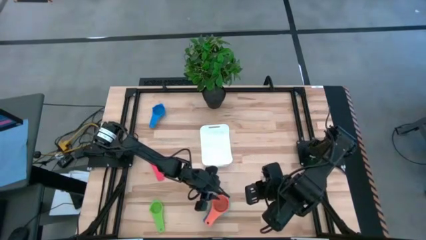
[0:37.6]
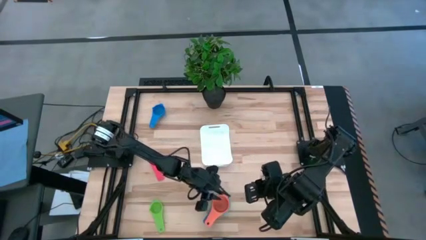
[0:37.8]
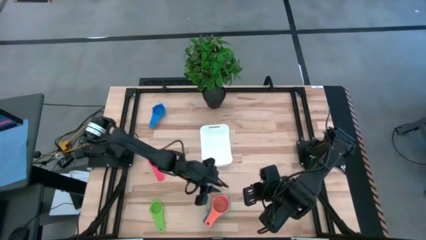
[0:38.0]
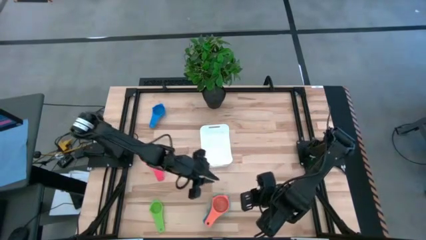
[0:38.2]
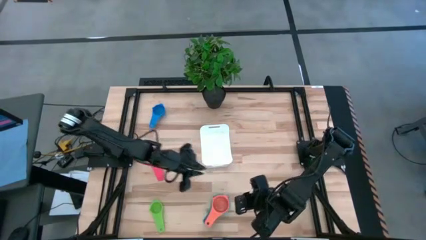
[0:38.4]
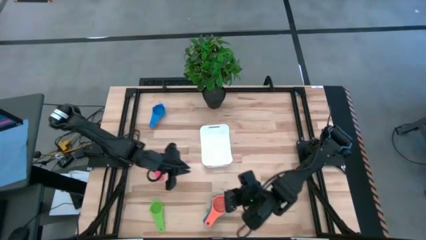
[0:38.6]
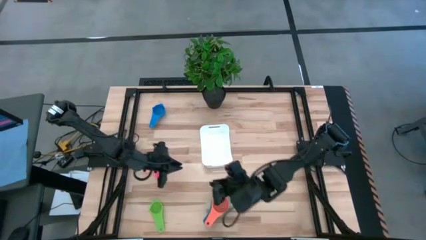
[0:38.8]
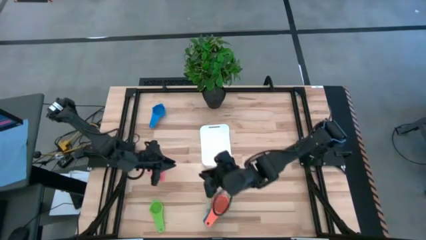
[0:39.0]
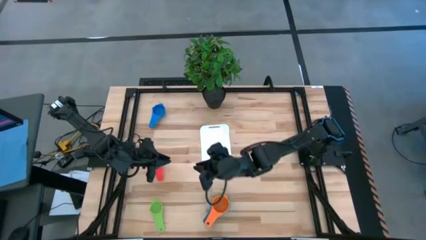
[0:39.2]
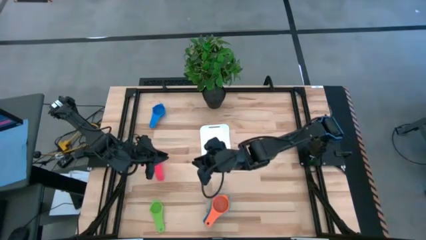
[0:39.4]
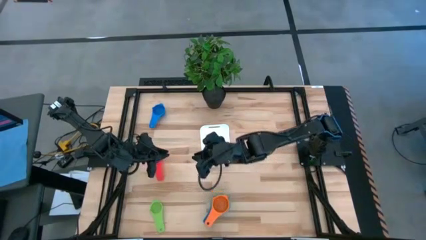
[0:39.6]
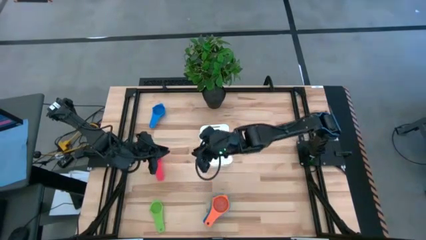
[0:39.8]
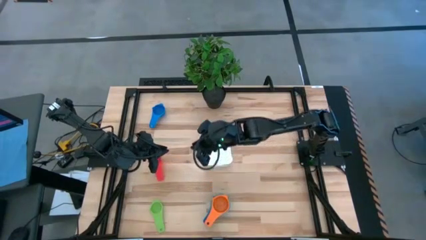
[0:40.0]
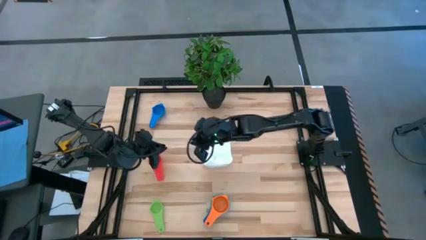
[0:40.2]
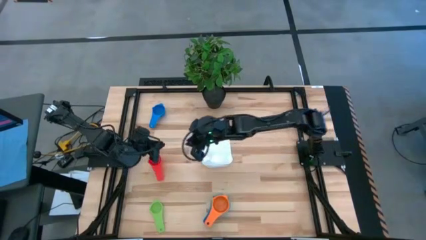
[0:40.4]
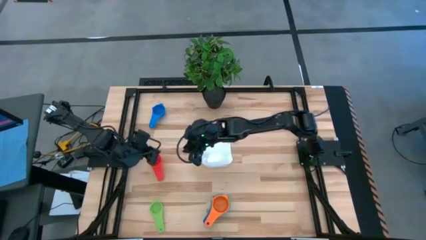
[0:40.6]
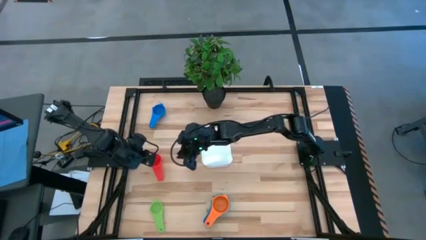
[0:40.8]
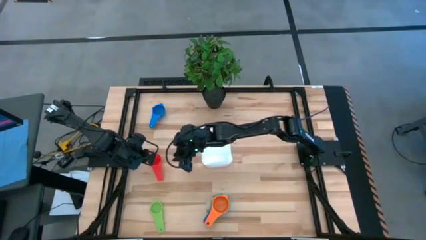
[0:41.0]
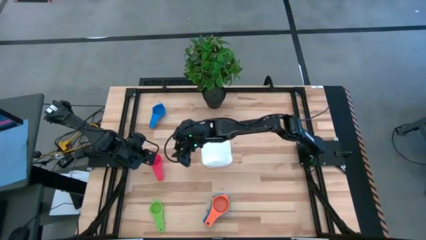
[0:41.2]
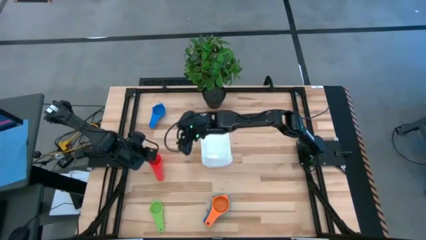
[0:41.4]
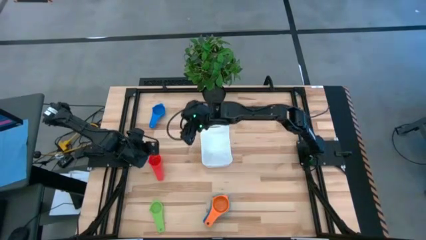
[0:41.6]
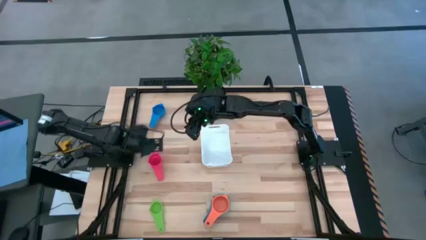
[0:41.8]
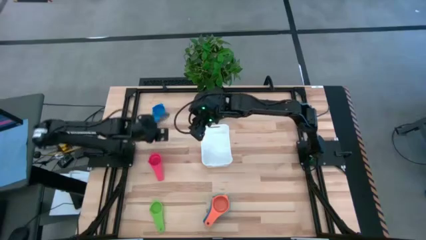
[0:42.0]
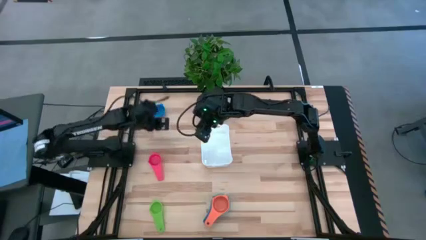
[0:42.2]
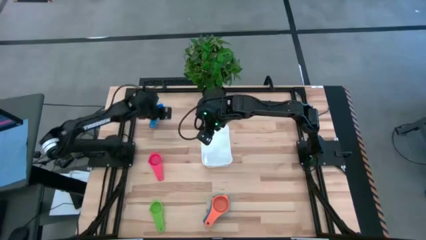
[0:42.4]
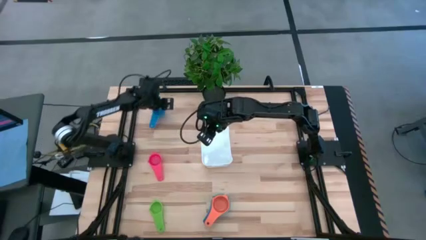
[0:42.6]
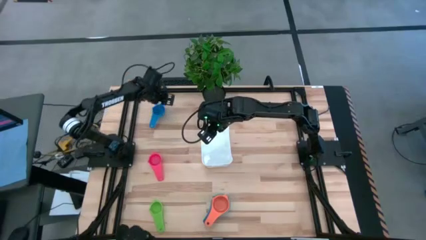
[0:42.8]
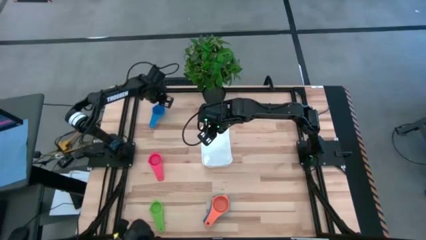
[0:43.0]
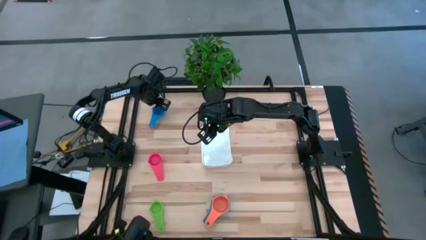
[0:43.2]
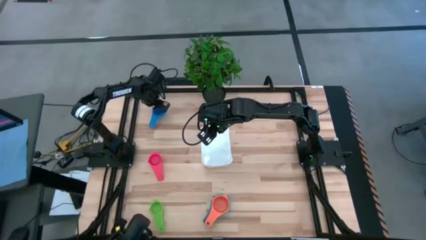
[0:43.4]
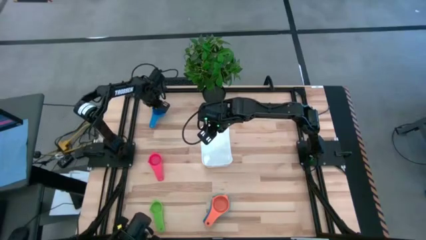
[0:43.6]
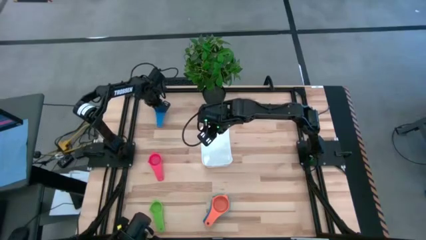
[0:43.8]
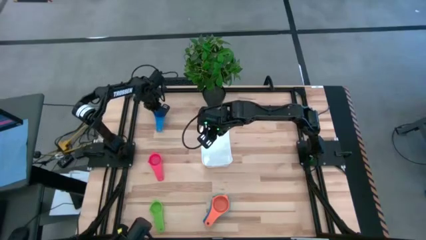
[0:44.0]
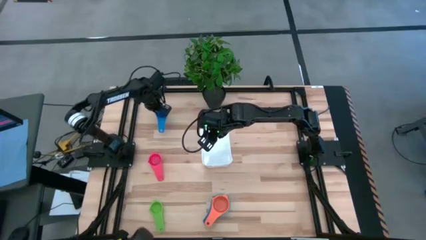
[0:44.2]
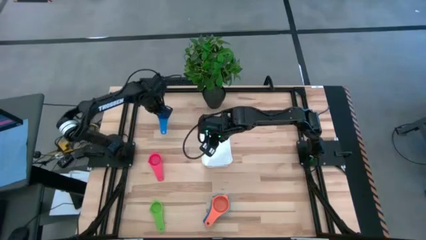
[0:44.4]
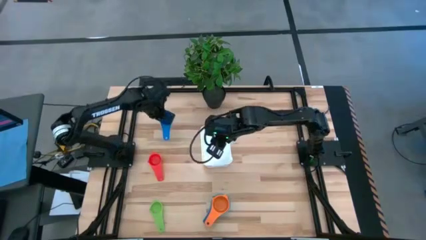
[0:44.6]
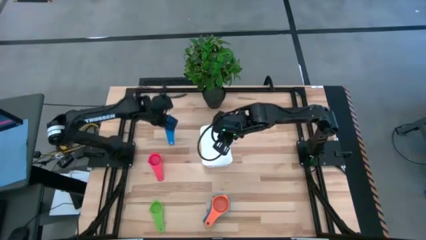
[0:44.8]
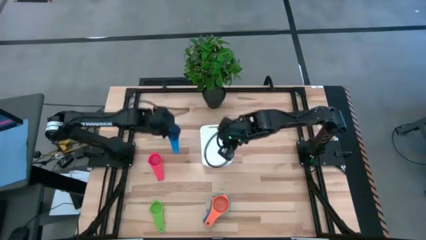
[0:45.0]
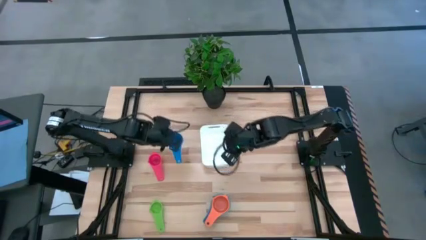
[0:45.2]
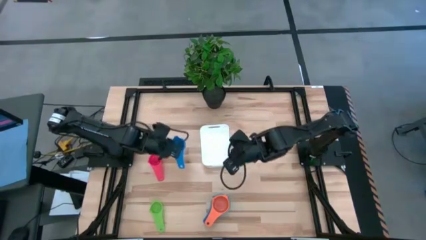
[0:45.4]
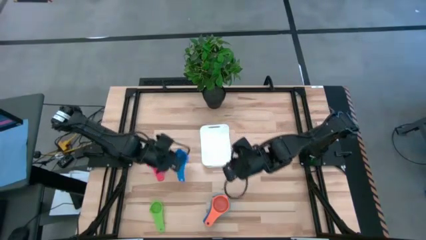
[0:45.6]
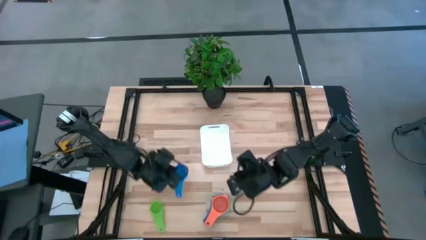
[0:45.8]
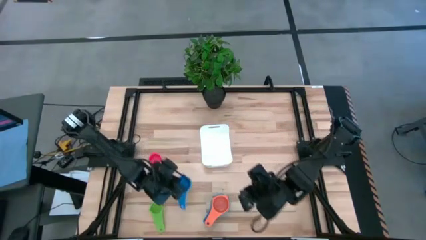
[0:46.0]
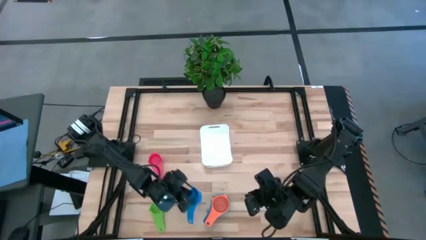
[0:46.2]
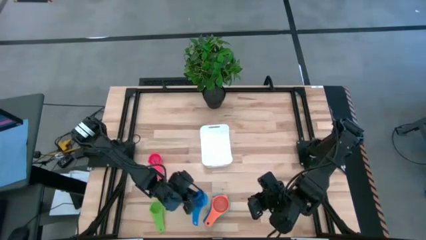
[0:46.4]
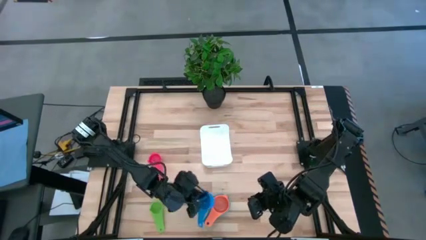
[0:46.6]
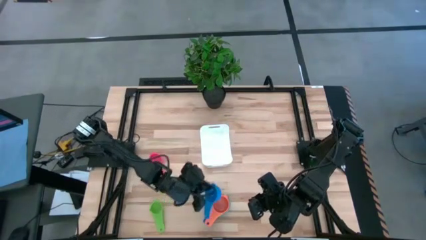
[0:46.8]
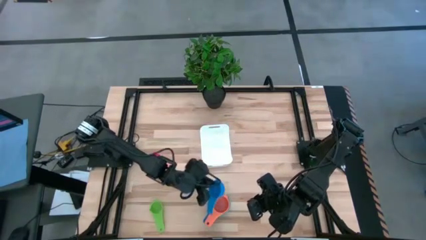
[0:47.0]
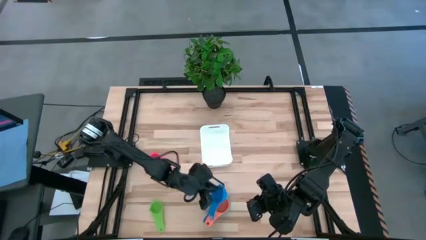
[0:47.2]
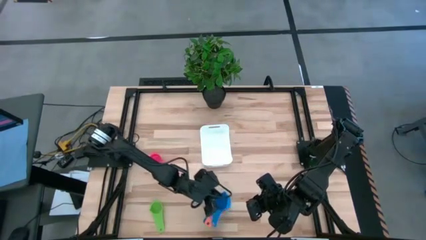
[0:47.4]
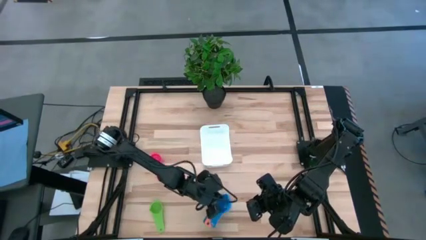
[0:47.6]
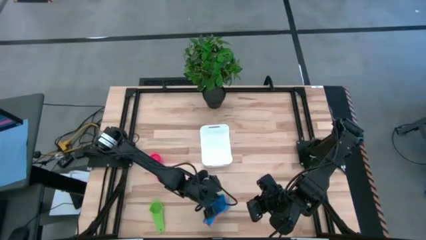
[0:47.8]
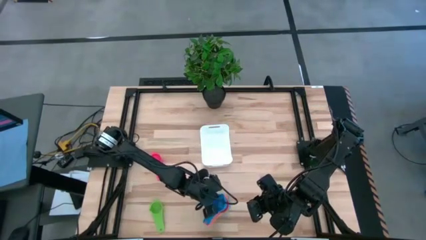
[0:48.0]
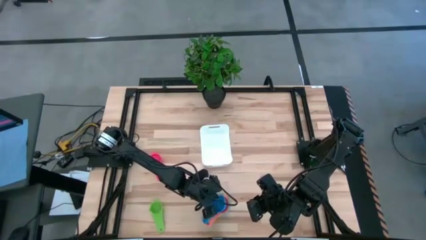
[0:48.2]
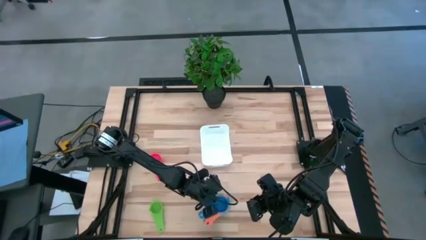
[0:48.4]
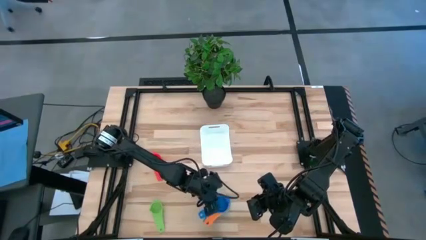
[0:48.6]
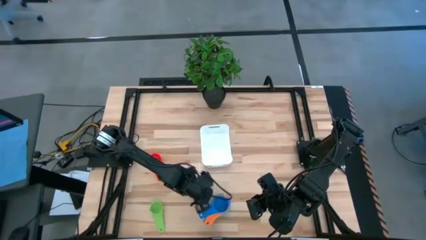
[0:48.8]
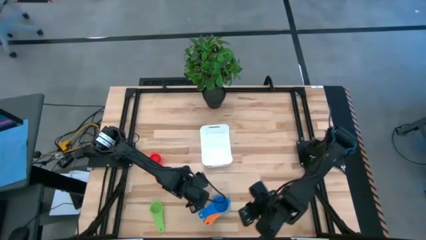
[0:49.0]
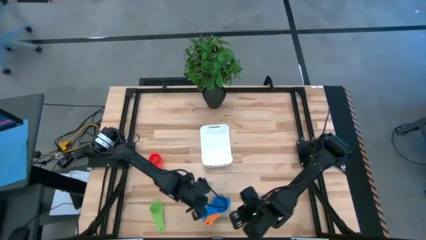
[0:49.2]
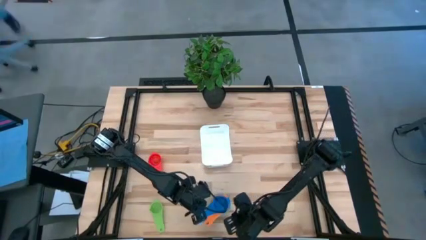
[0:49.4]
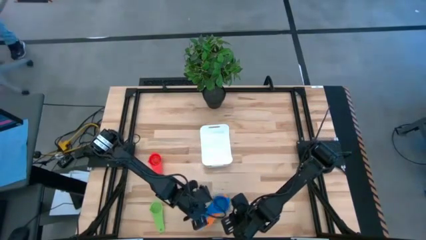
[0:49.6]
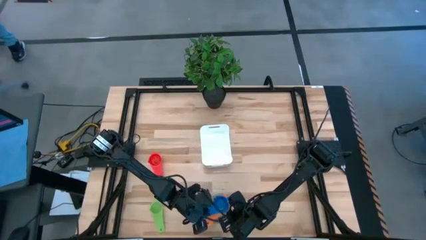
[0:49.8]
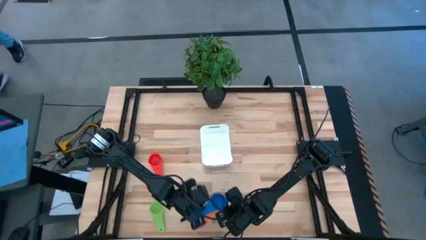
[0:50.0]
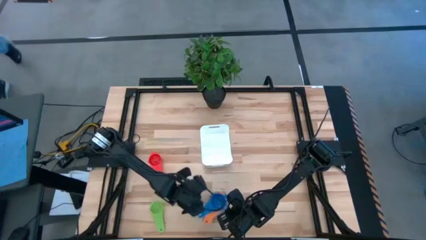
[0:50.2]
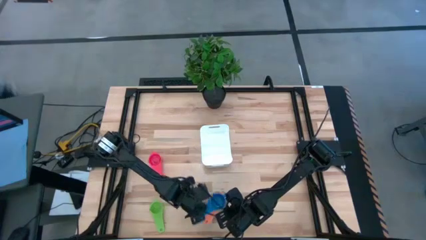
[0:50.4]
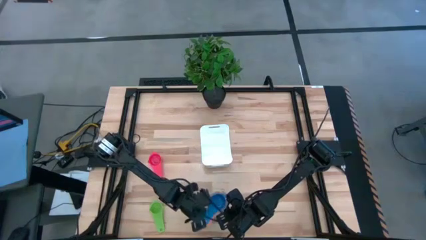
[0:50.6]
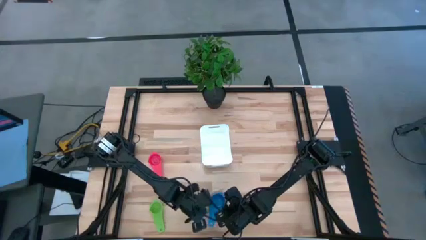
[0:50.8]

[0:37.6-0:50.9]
Task: Nest measuring cups in basket
Stack the blue measuring cup on top of the orange measuring cup

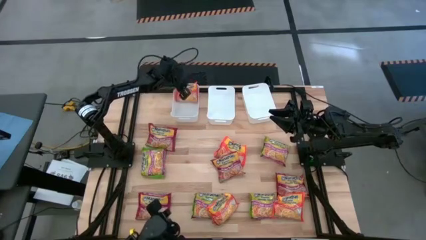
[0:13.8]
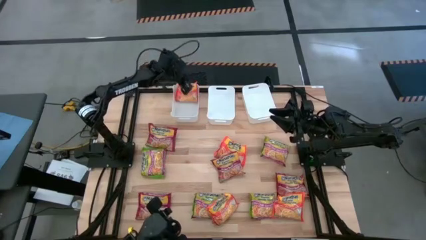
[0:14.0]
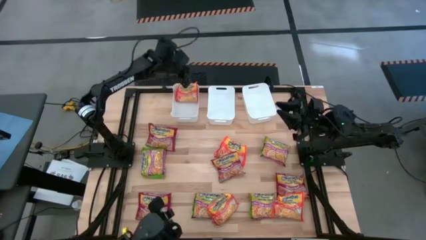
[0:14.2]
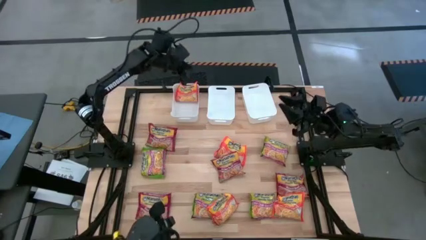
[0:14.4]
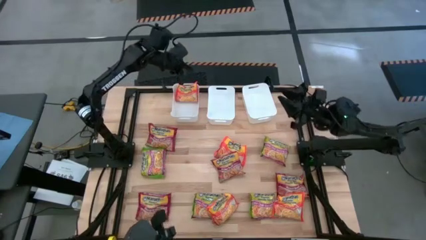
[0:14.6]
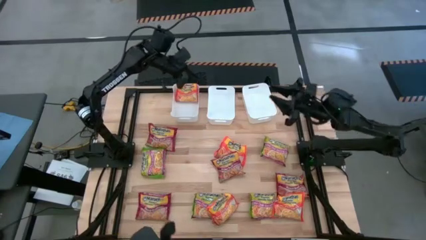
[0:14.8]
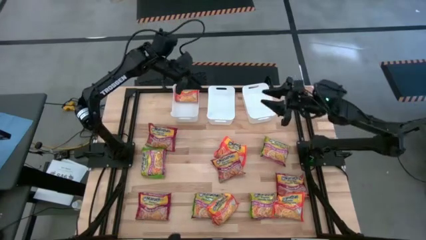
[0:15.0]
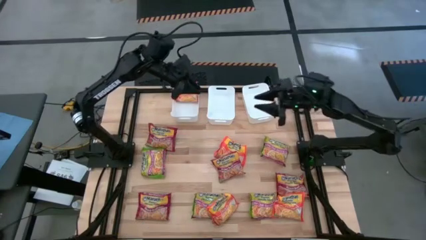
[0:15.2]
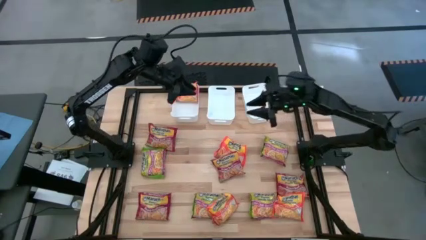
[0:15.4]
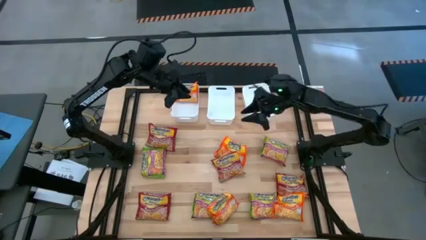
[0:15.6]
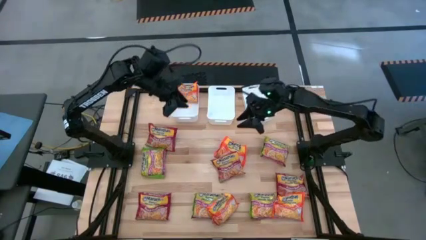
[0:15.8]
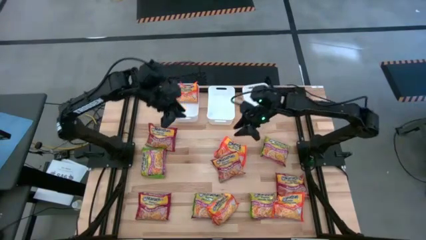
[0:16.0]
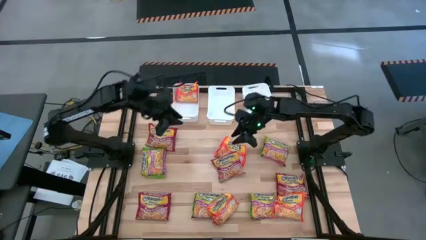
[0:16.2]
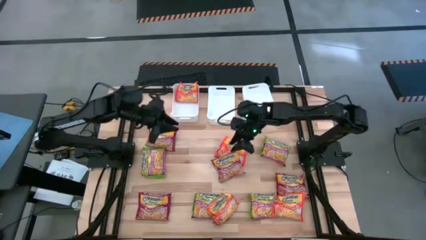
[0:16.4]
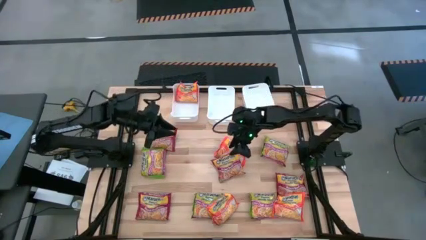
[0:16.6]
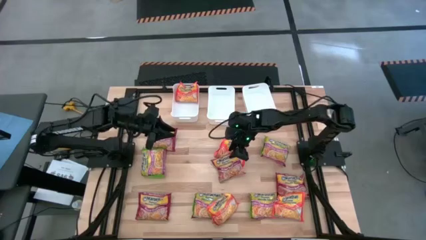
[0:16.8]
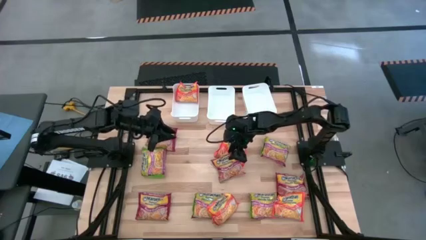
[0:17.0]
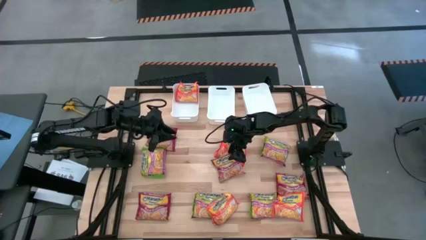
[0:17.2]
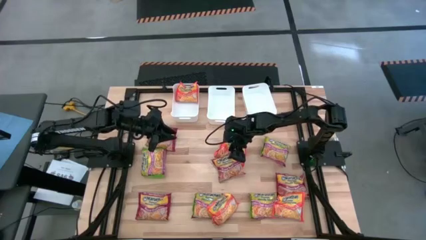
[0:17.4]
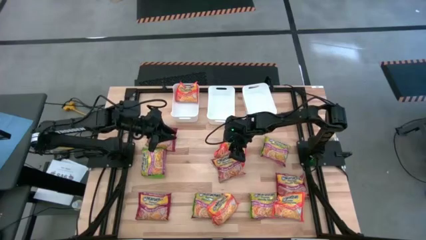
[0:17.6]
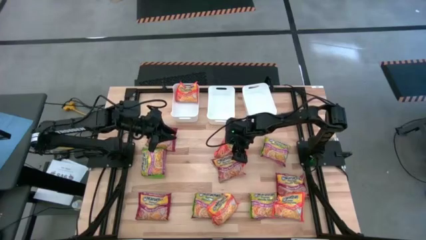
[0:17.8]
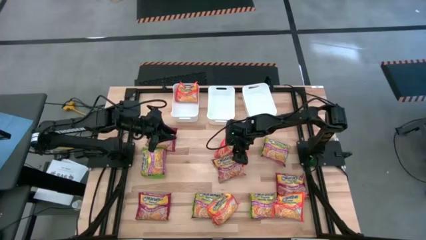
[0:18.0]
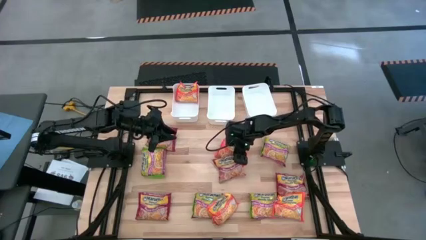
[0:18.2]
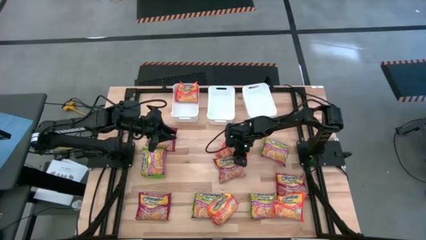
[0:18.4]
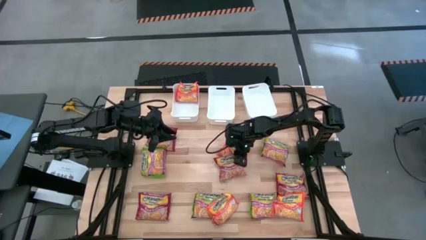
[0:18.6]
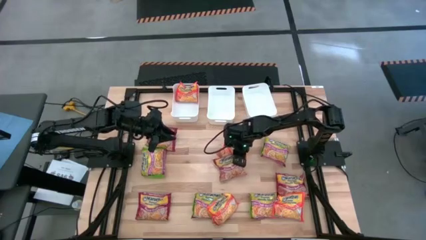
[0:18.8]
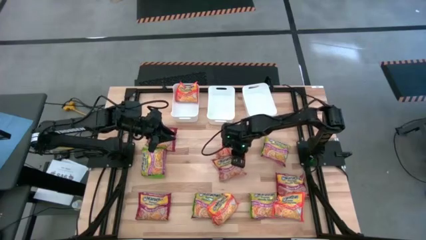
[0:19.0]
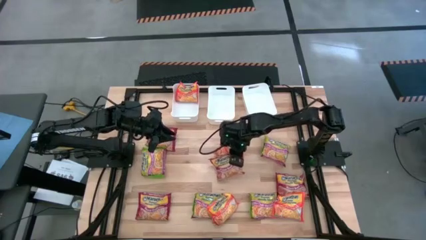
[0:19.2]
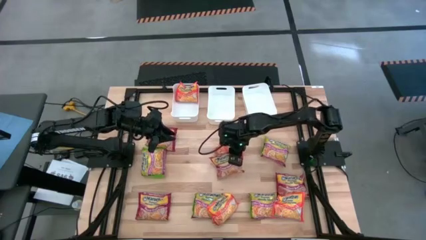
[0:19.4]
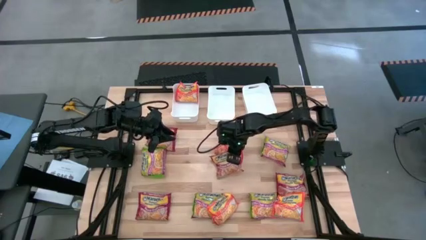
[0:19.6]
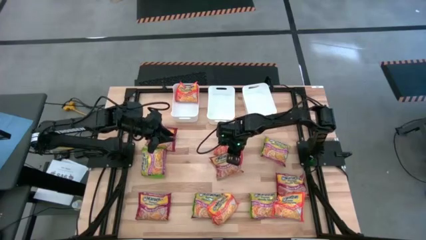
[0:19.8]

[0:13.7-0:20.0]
Task: Sort Maruchan noodles
Put the red noodle pack into the right white bin
